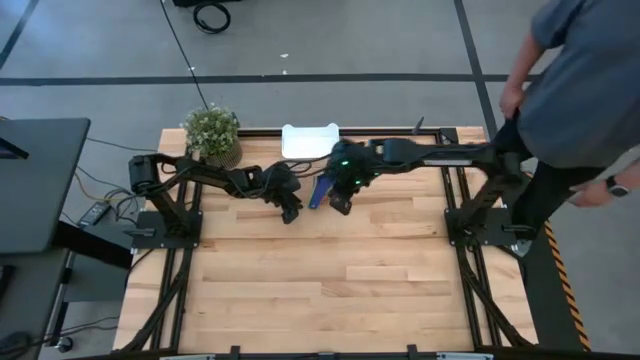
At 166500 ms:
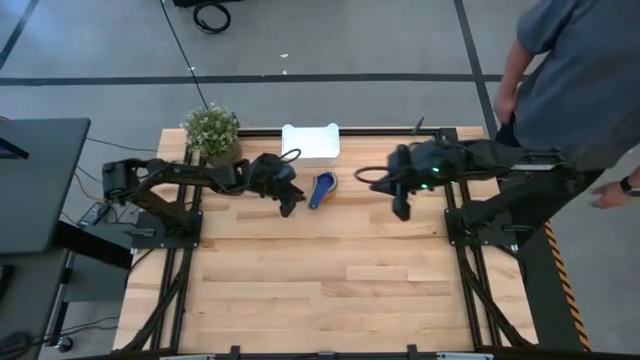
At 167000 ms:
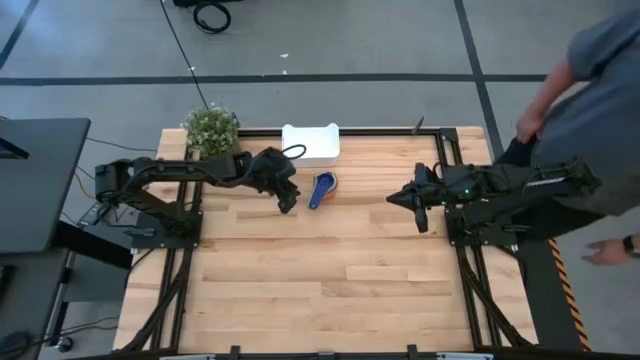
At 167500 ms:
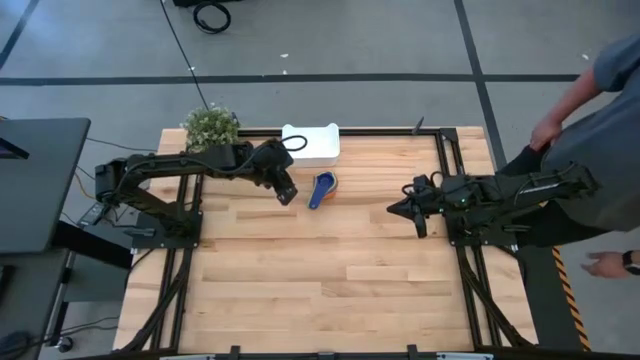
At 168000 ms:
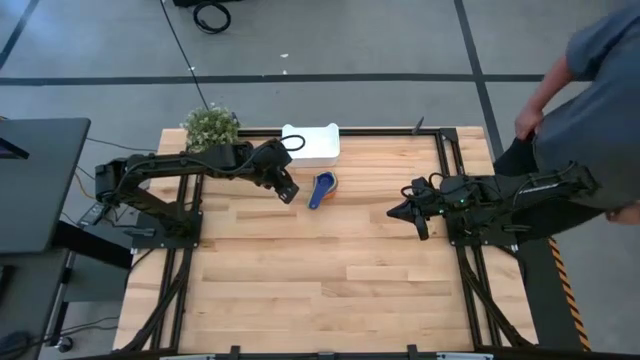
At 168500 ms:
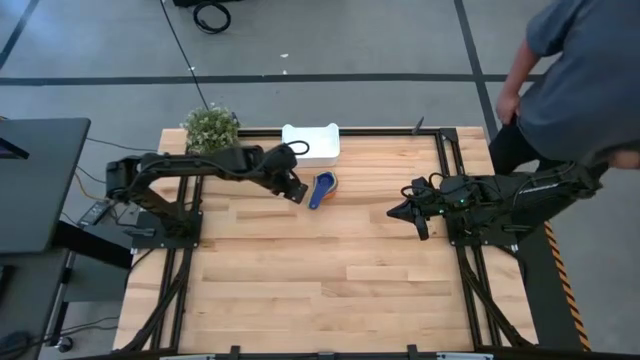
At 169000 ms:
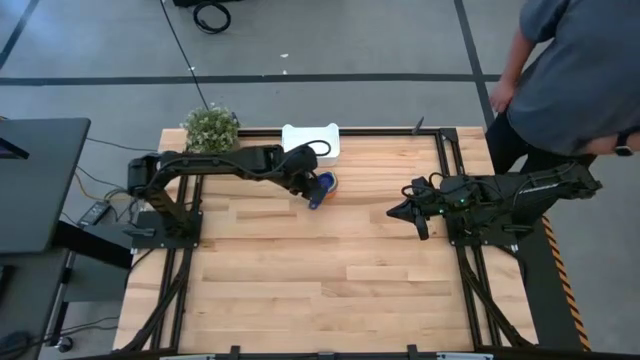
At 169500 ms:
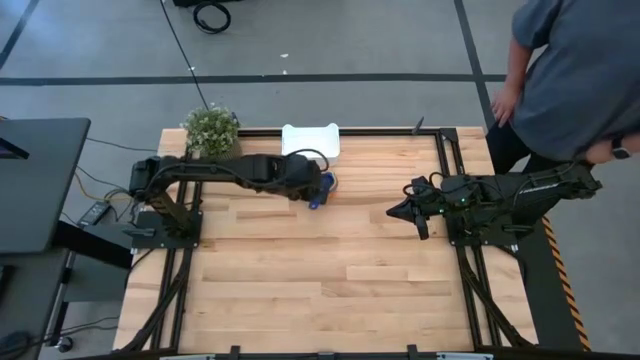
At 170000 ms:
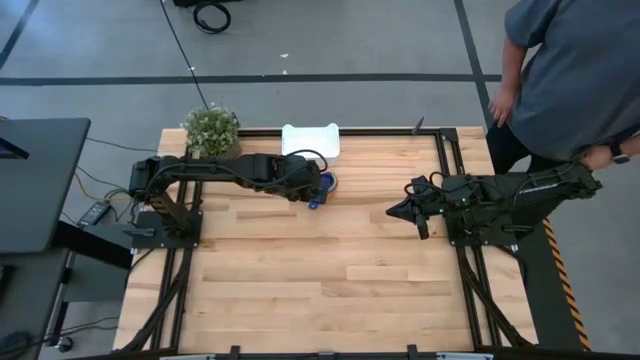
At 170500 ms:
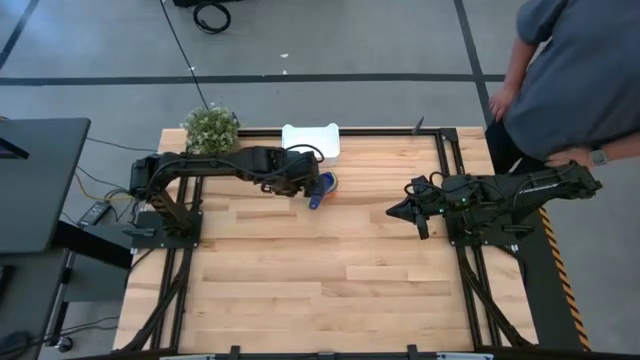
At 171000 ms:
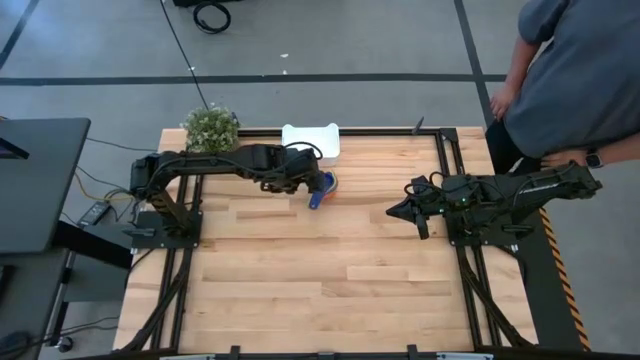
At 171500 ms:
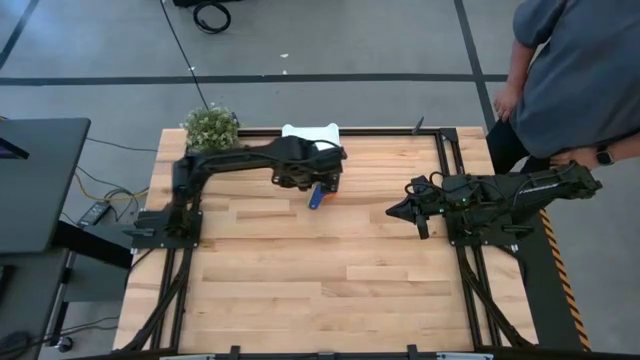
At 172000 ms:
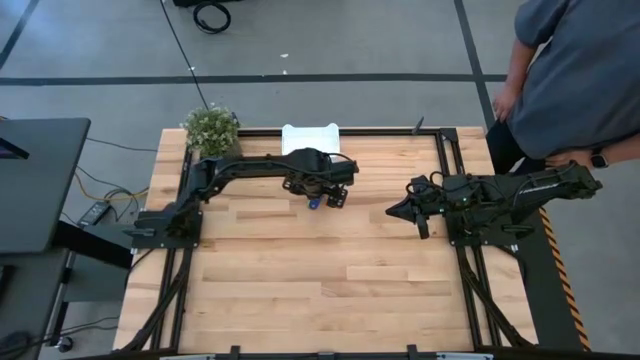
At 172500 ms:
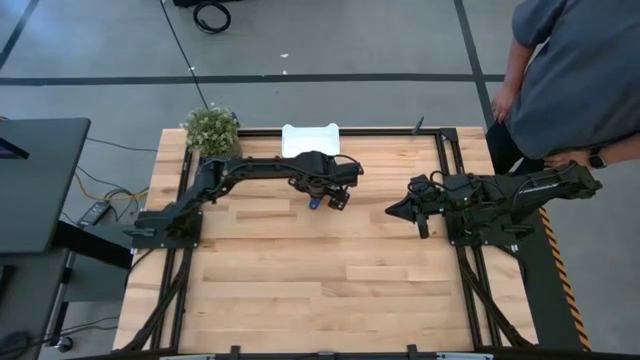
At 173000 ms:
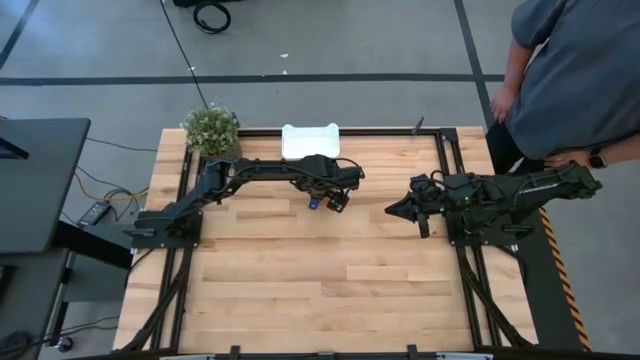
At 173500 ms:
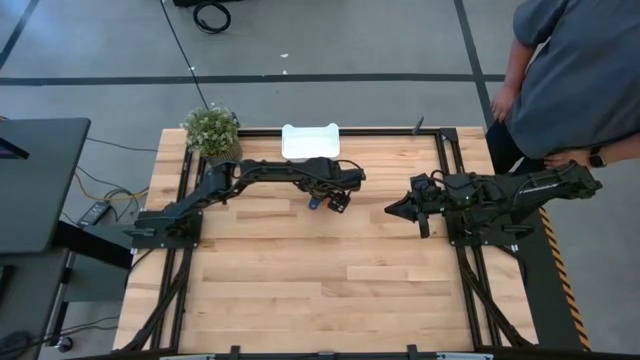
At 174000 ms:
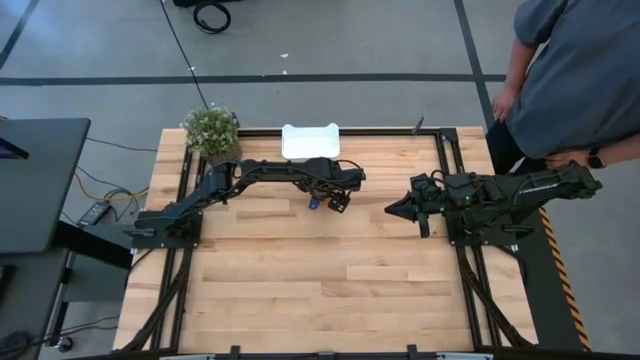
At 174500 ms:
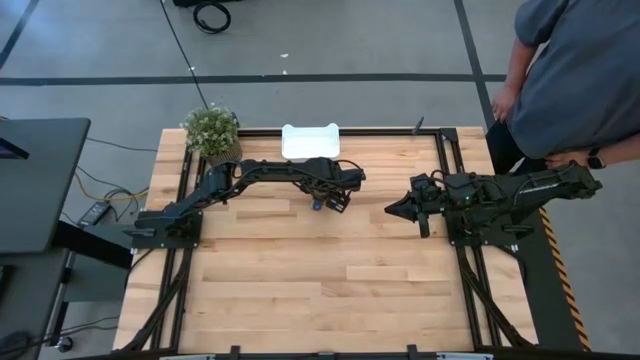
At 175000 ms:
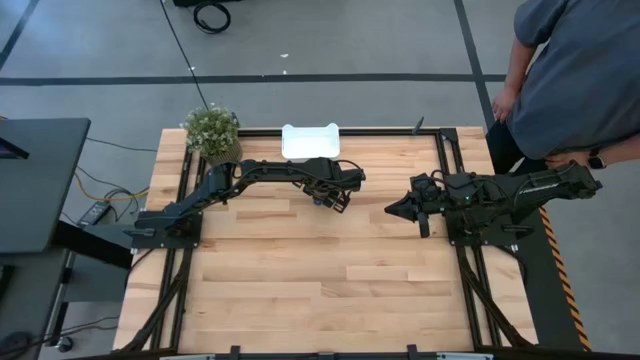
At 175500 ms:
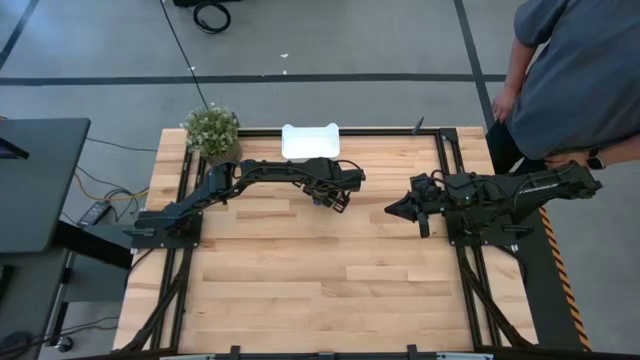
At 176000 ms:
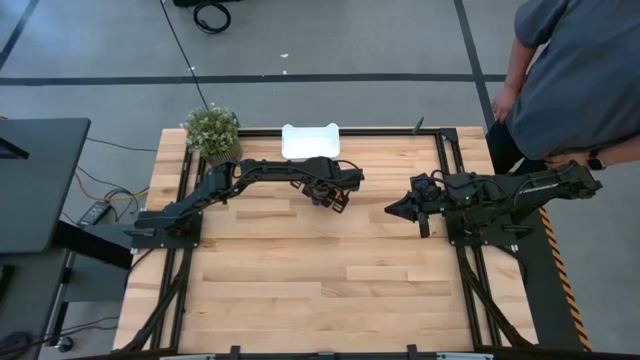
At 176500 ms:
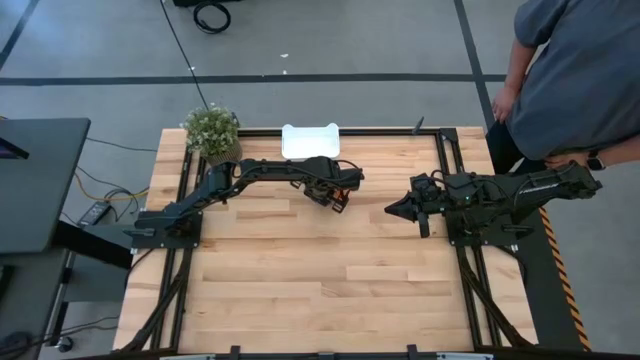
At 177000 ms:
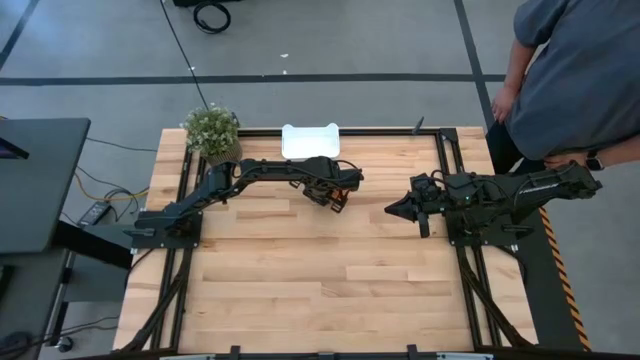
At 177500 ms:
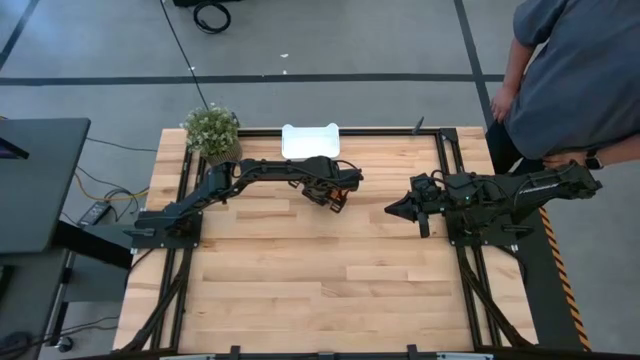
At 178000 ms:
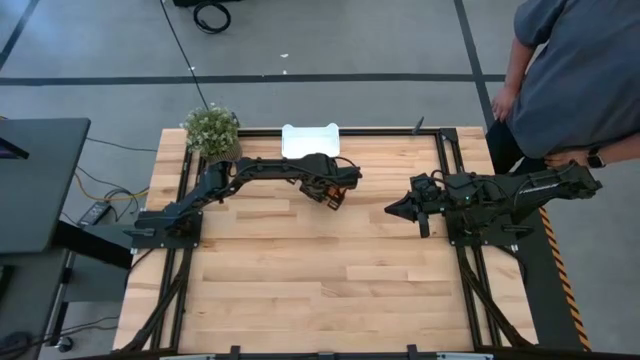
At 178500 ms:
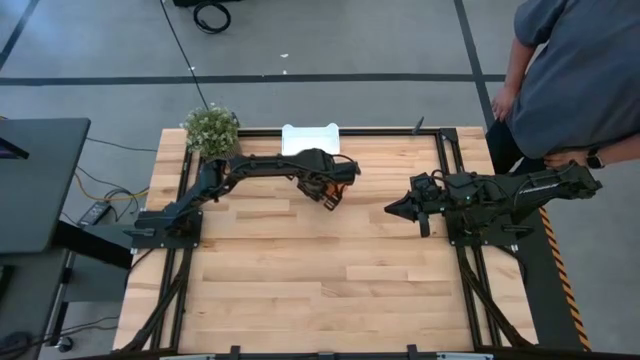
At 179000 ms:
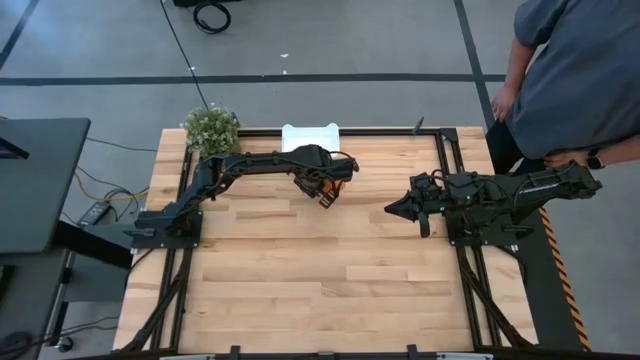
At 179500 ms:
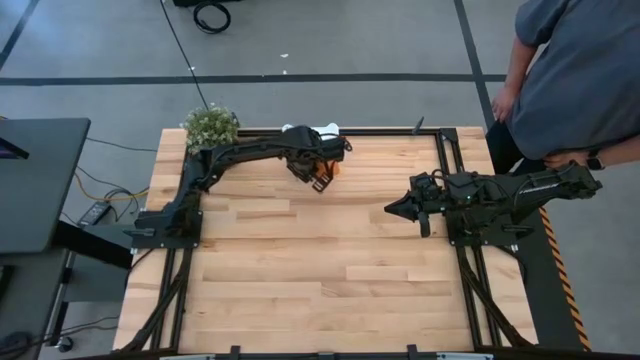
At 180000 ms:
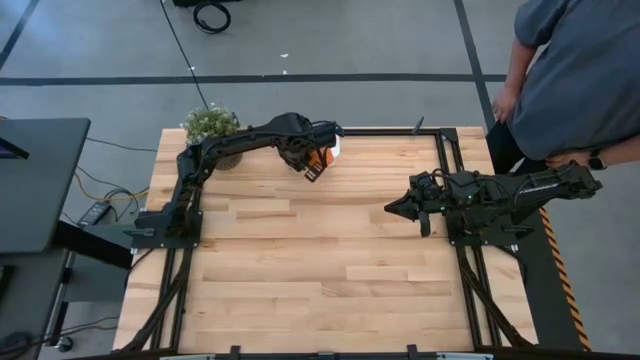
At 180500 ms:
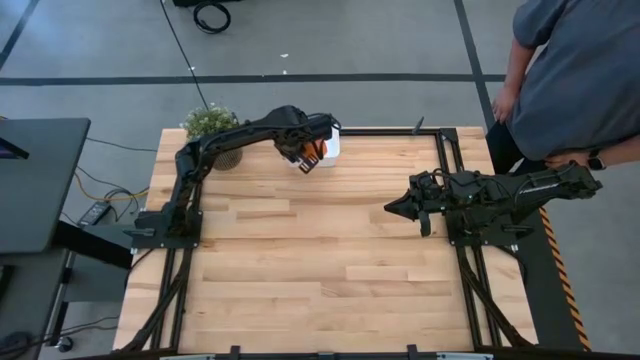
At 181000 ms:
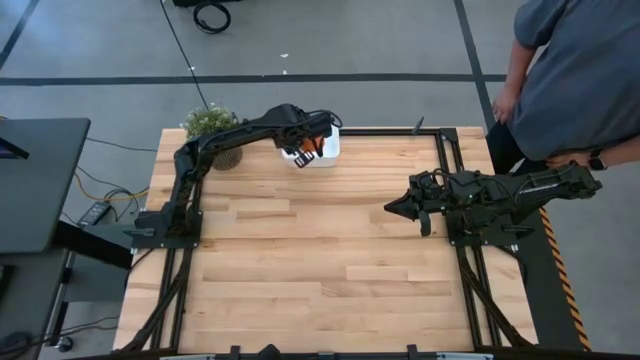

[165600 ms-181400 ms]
Task: Nest measuring cups in basket
Put the nested measuring cups into the white bin

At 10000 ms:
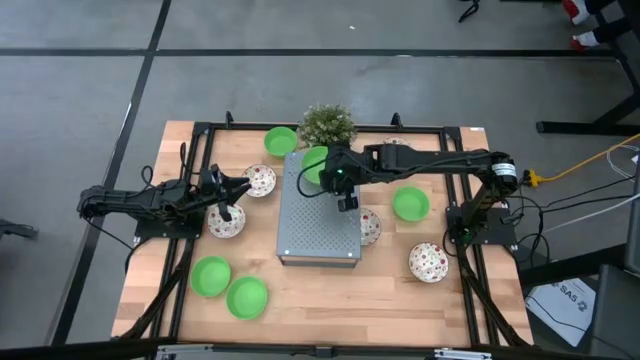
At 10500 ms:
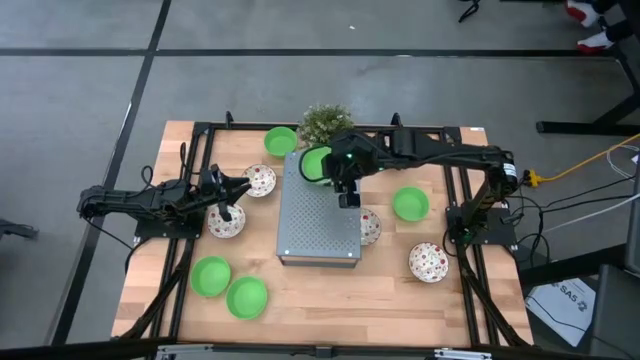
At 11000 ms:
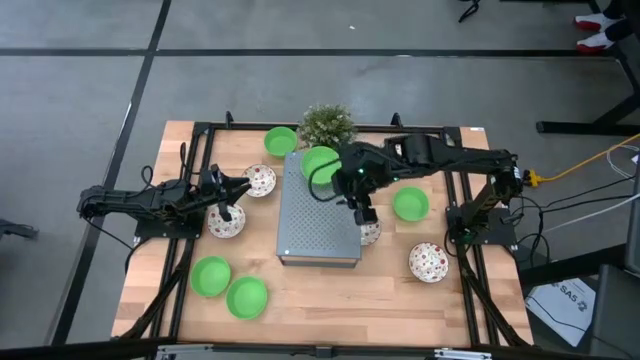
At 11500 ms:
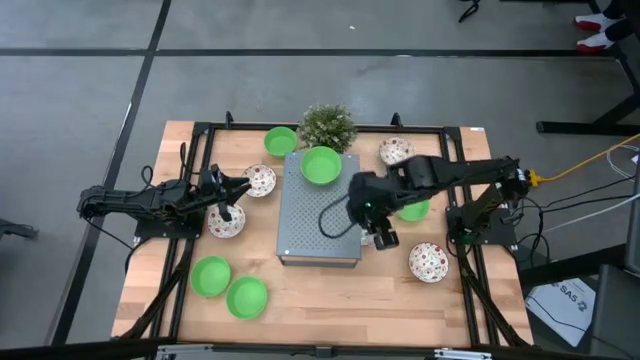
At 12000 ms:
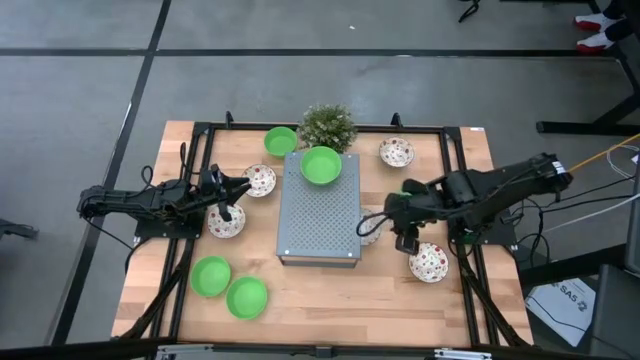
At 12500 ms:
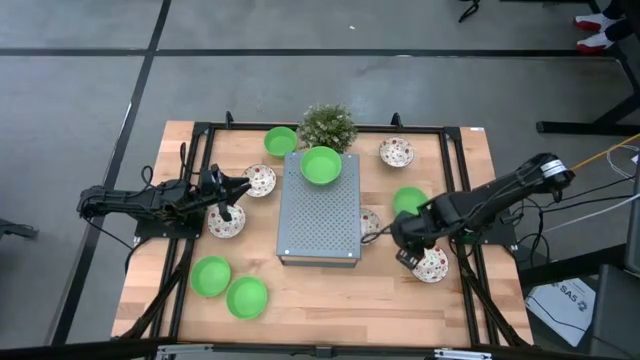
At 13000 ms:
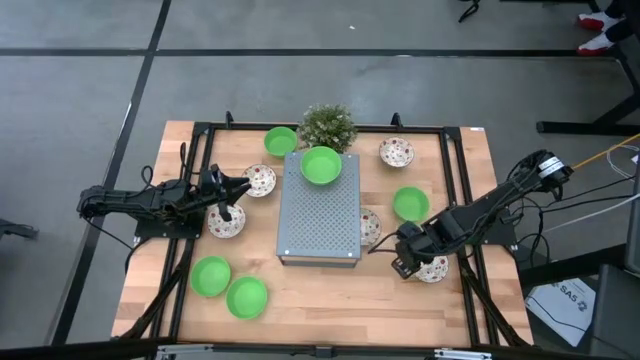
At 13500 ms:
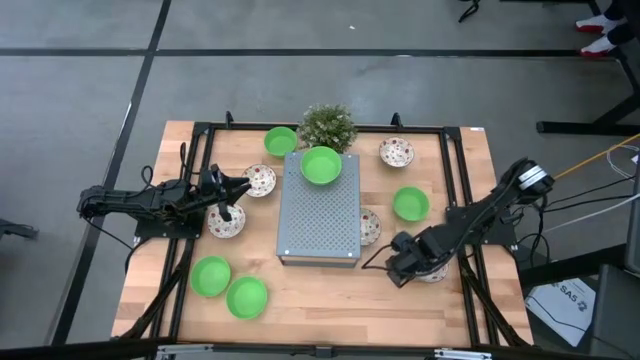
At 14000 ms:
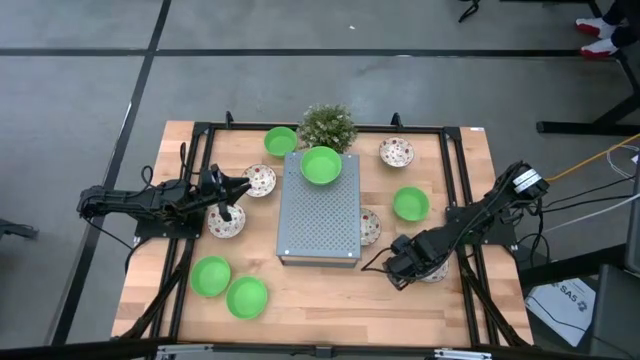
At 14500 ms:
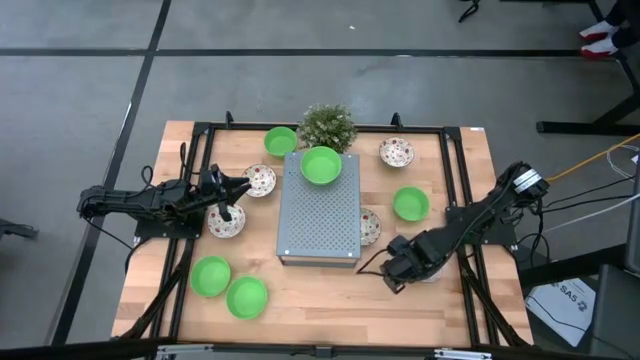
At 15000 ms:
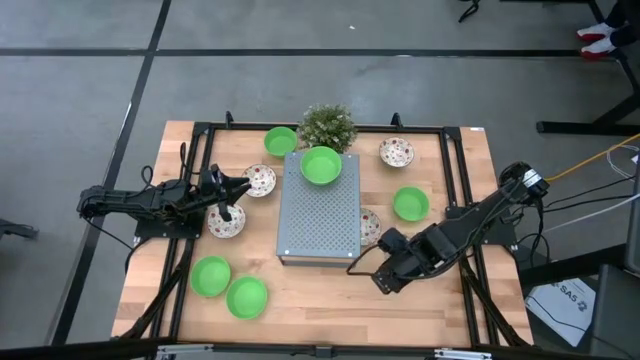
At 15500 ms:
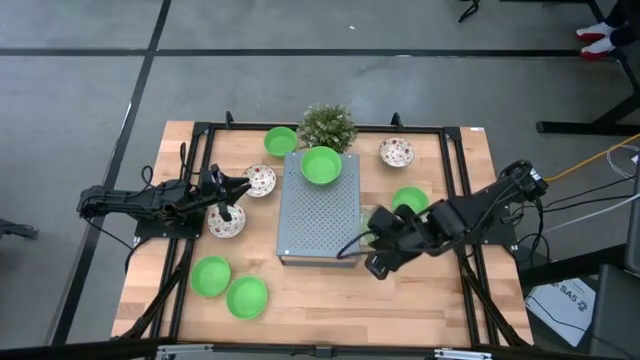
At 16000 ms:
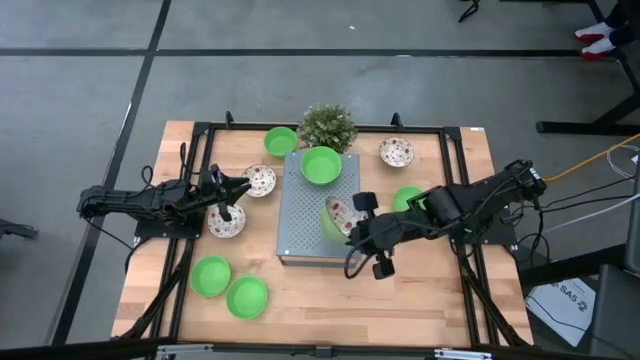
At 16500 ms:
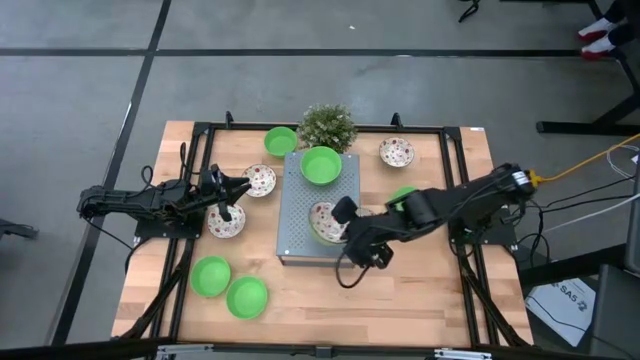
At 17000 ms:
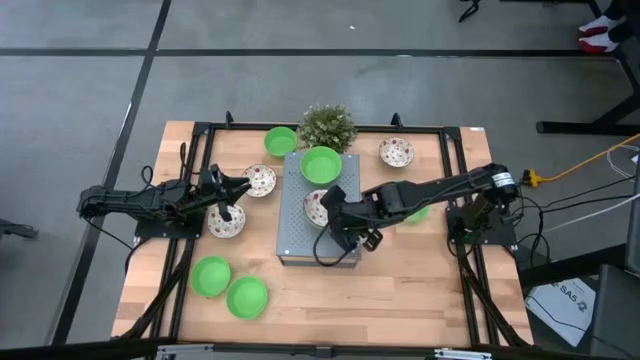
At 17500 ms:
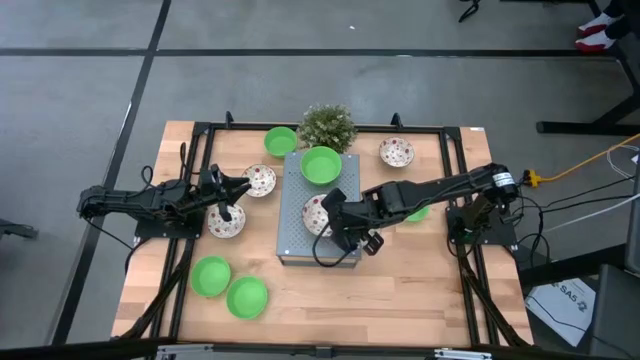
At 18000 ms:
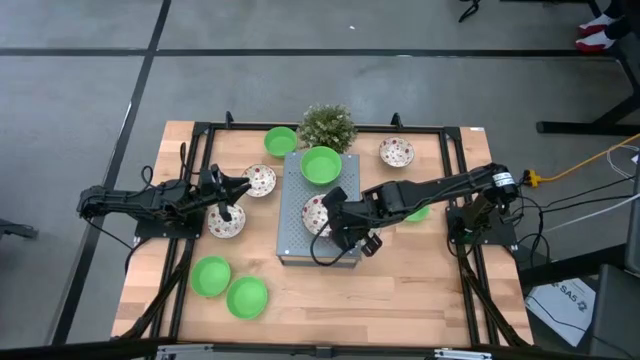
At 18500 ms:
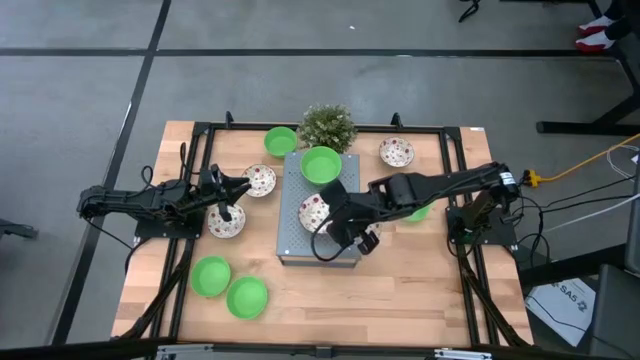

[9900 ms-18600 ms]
Task: Pick & Place Mini bowls
Put the red patterned bowl on the shelf
